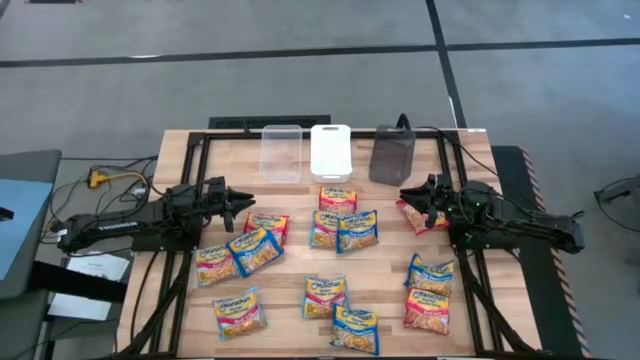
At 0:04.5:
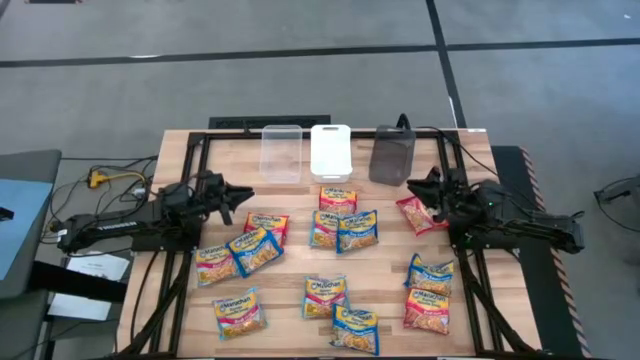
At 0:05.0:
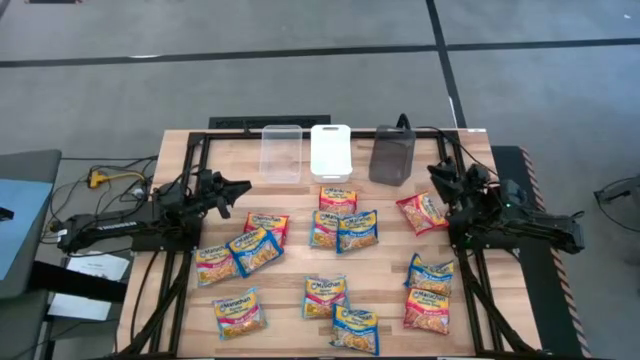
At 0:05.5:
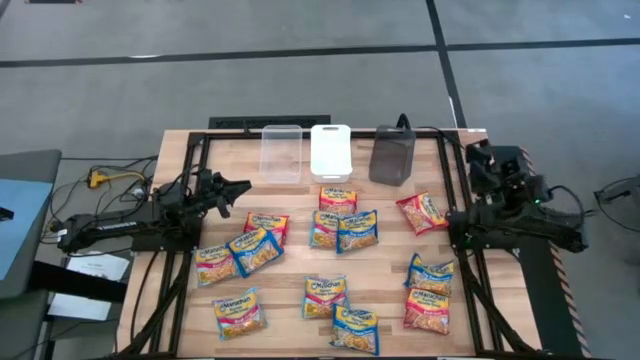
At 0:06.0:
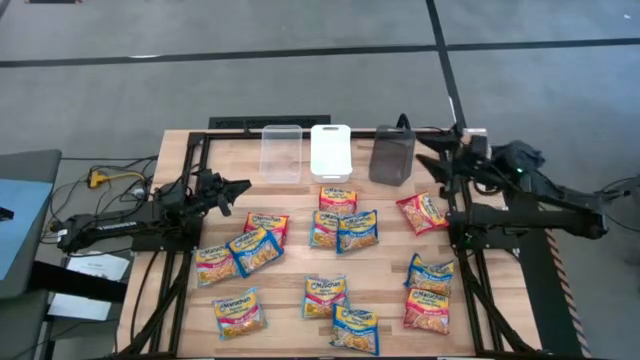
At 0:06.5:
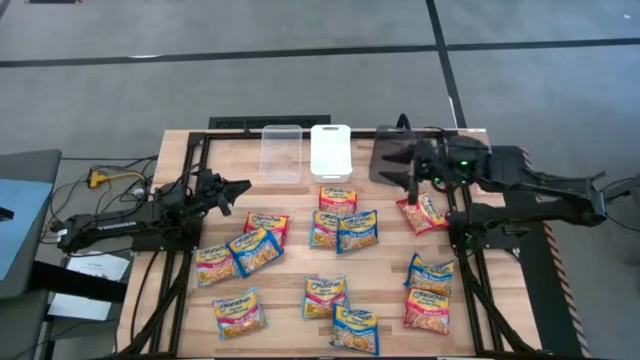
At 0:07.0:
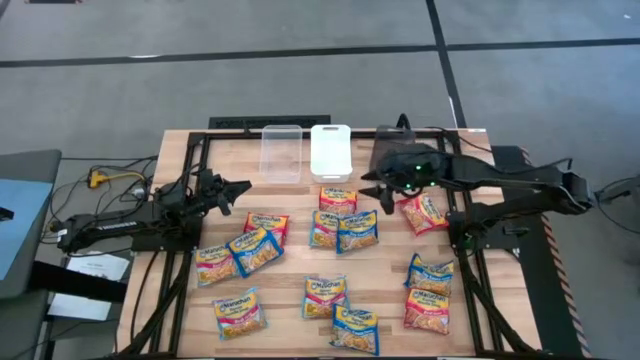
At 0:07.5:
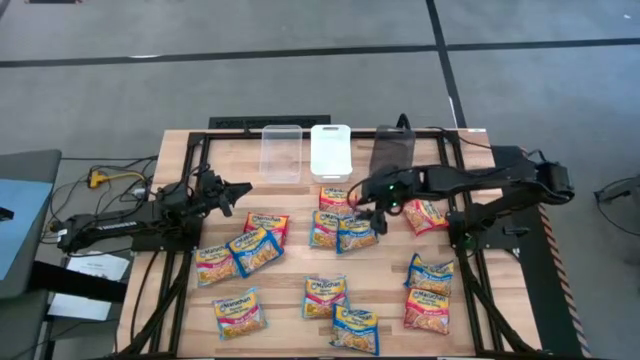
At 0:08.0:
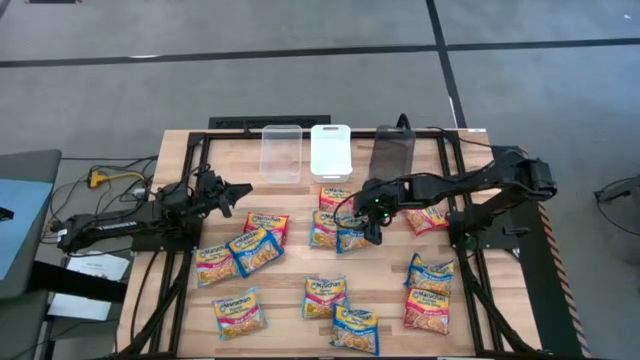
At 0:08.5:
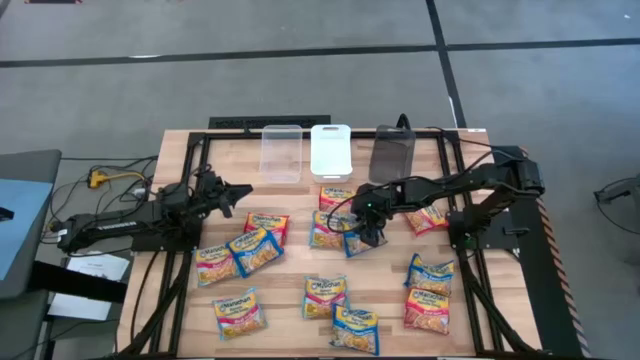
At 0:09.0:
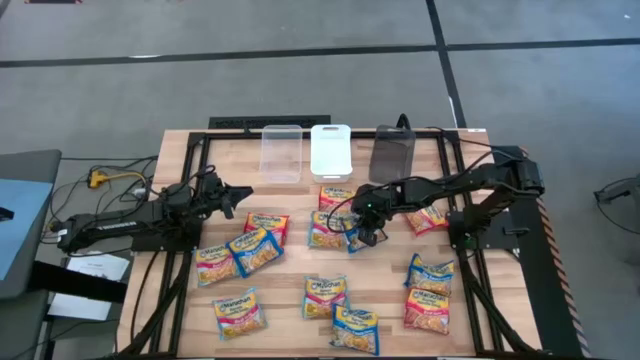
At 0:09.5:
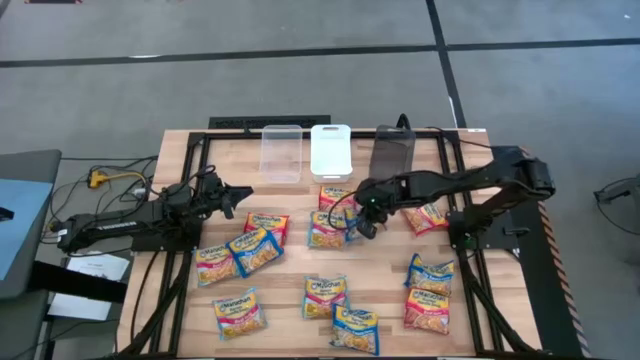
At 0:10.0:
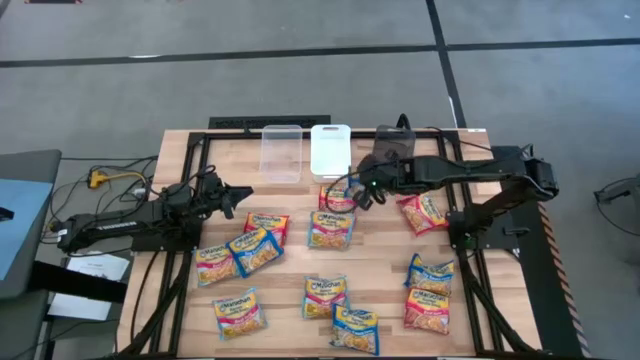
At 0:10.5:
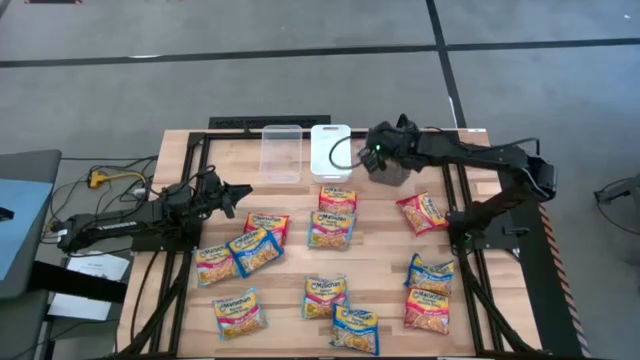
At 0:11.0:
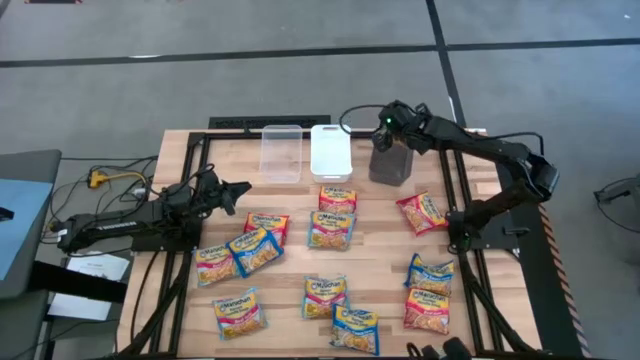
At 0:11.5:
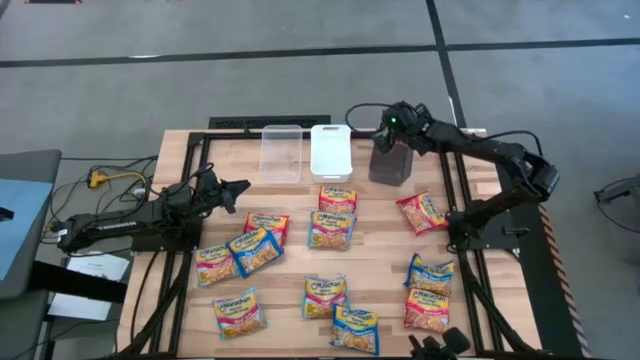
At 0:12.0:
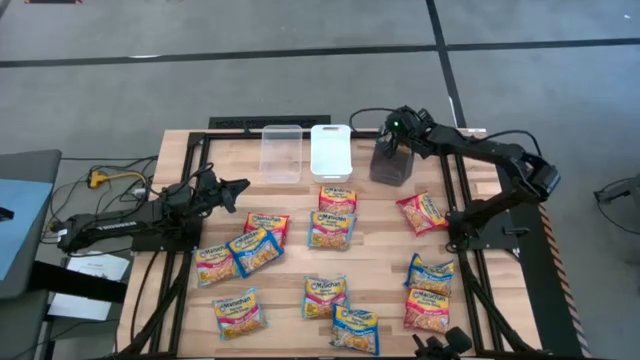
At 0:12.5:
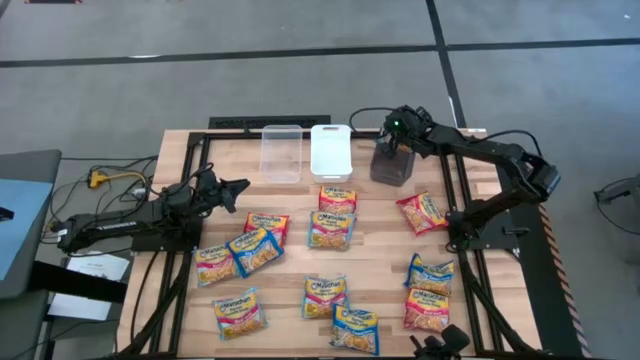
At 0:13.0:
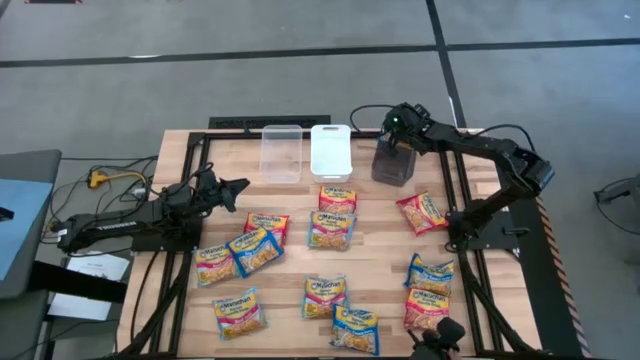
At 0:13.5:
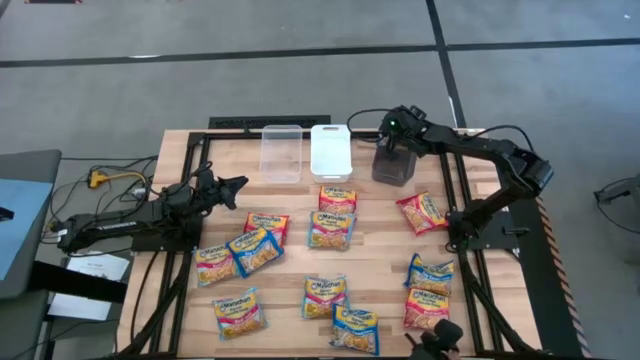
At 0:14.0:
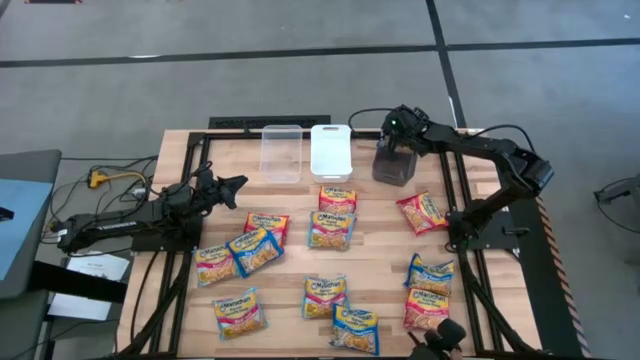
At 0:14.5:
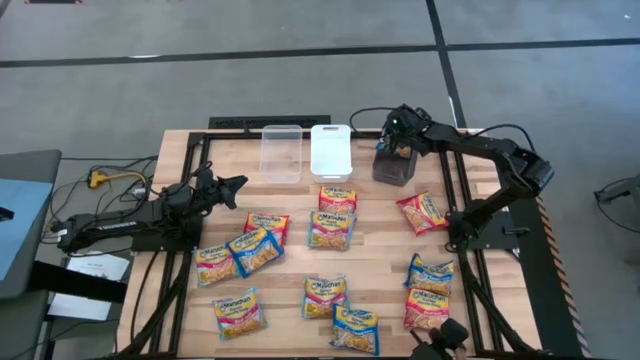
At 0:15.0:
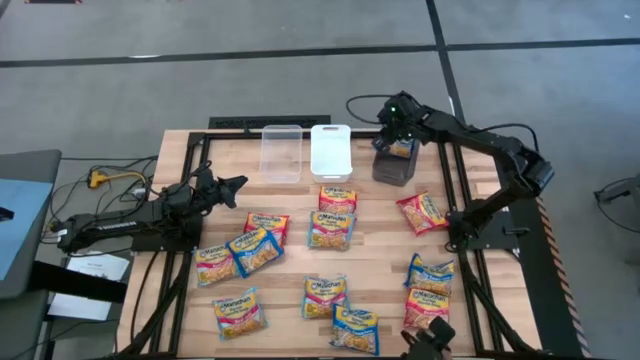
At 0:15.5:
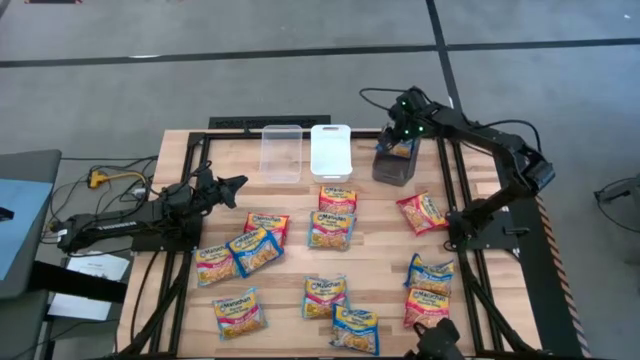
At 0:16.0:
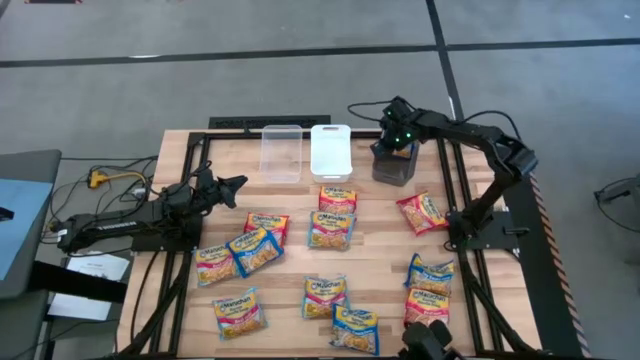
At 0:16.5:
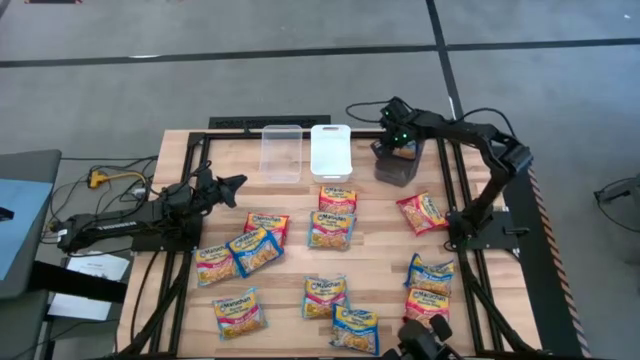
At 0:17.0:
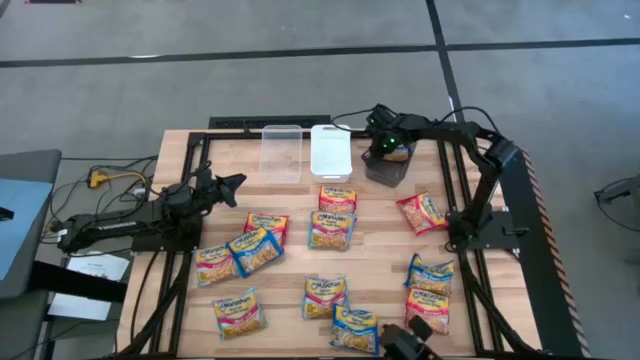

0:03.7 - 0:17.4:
Task: Sort Maruchan noodles
Put the blue noodle pack into the black bin

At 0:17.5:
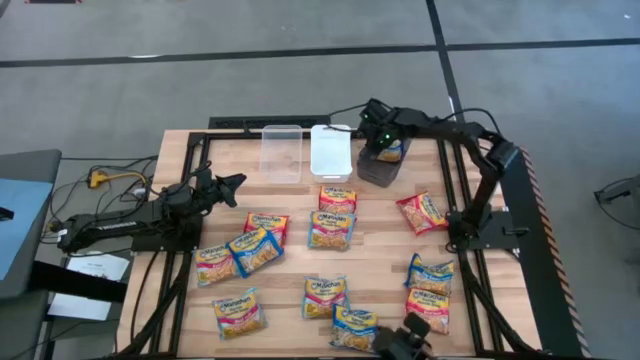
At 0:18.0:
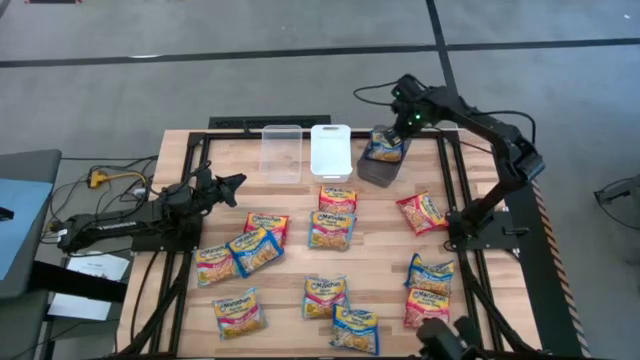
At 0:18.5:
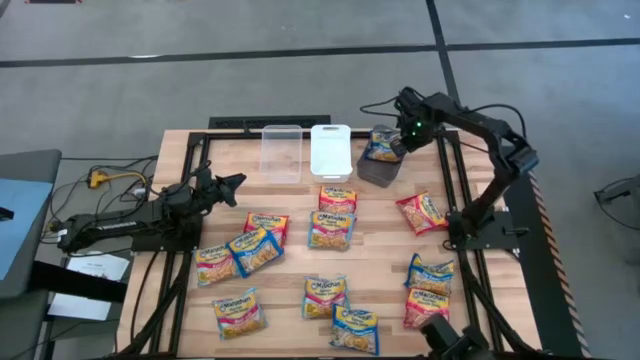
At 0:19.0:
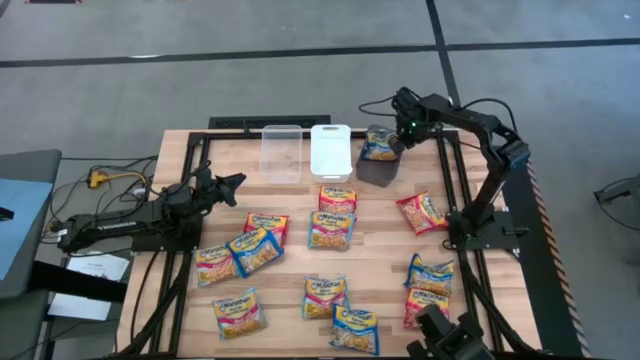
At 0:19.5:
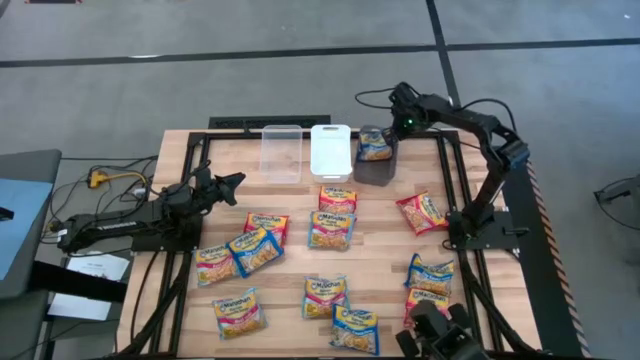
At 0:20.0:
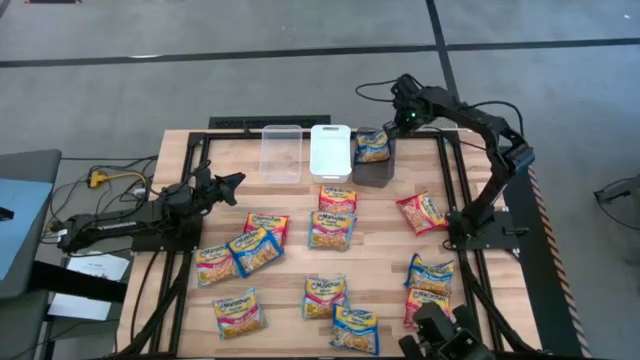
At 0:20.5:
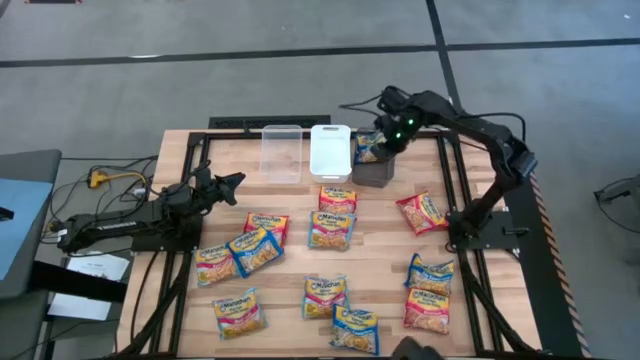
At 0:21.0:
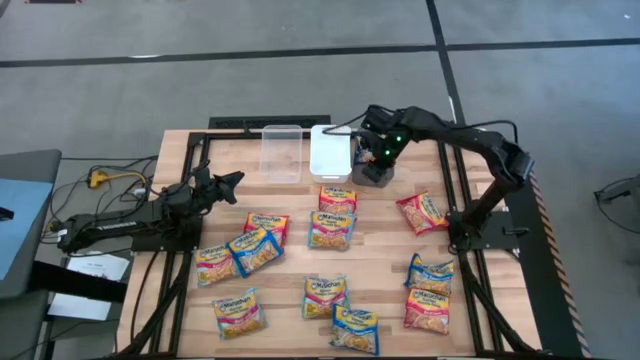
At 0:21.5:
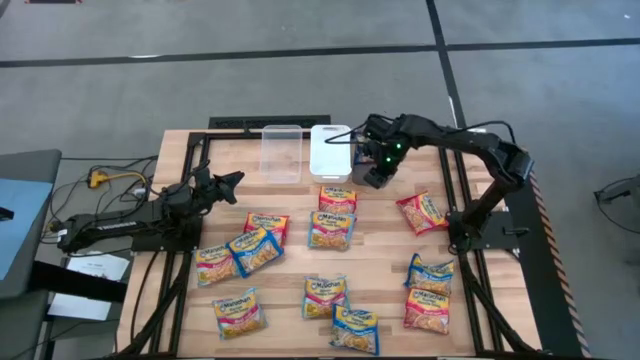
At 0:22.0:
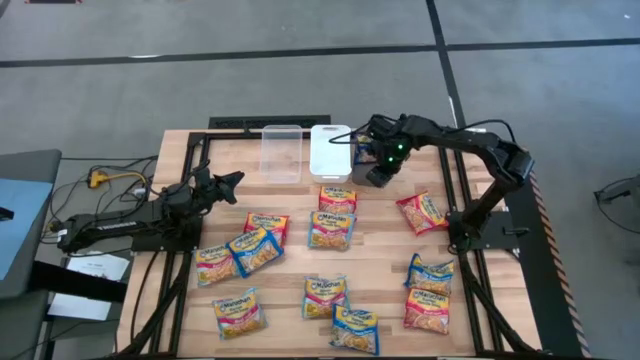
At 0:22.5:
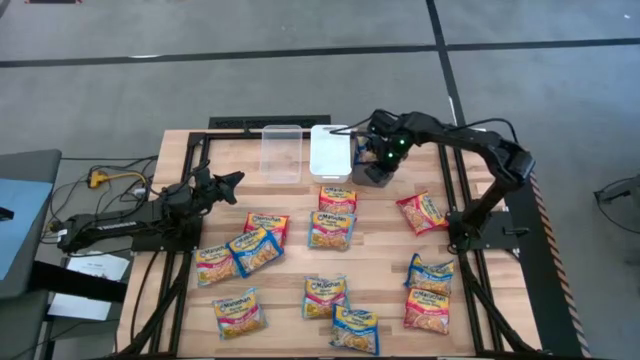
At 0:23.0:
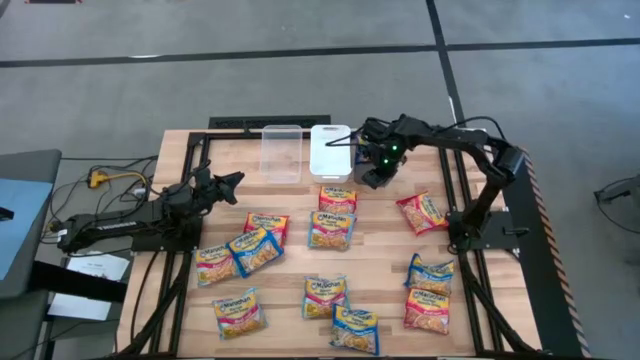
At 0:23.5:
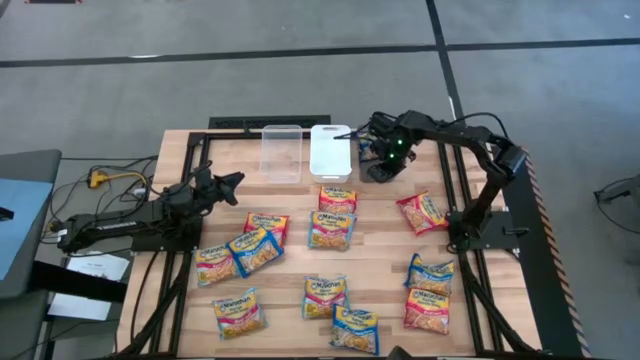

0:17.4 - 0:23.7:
Adjust the black bin
